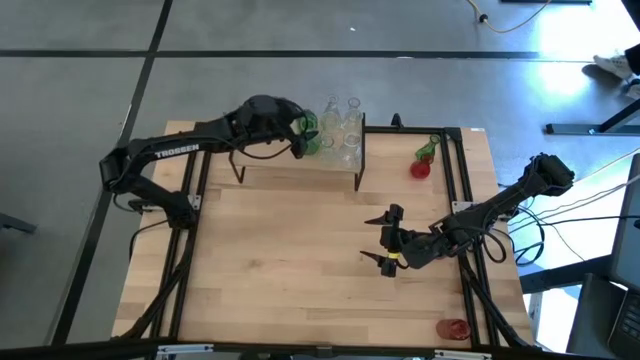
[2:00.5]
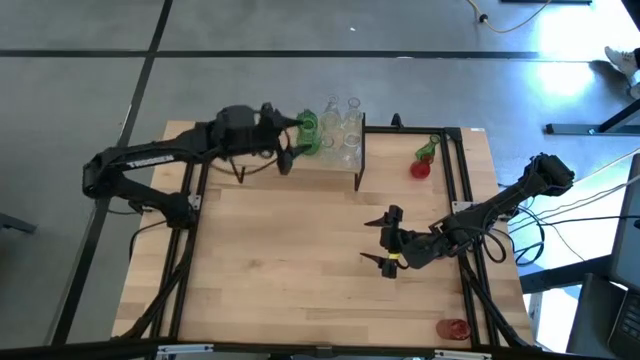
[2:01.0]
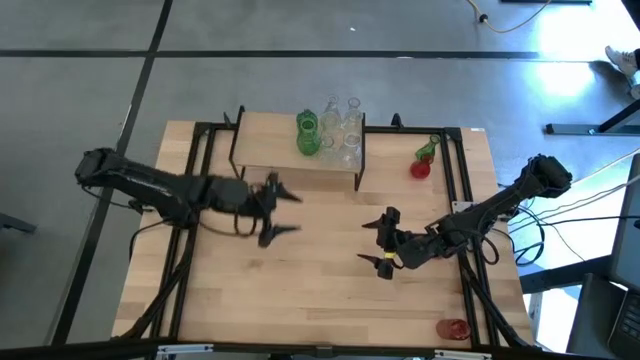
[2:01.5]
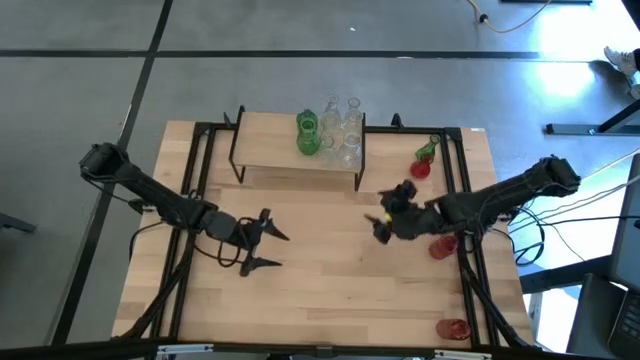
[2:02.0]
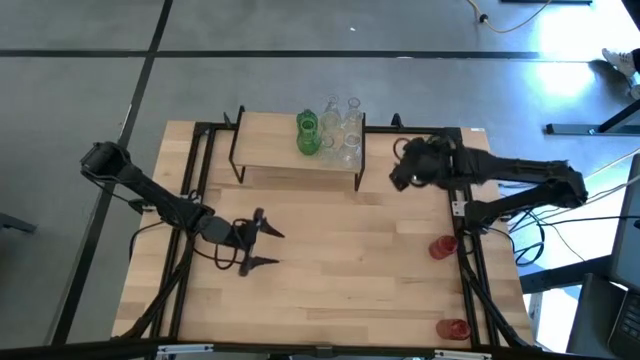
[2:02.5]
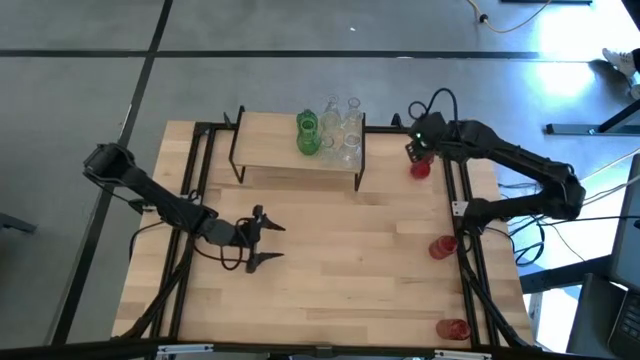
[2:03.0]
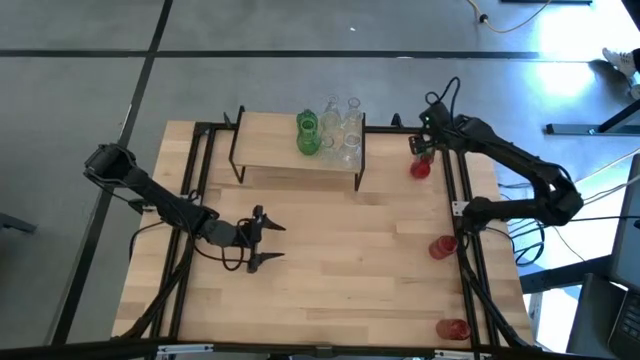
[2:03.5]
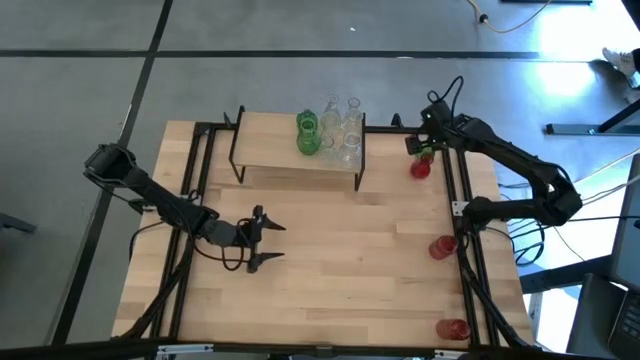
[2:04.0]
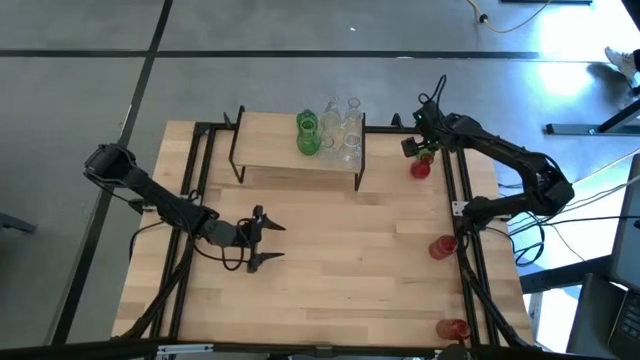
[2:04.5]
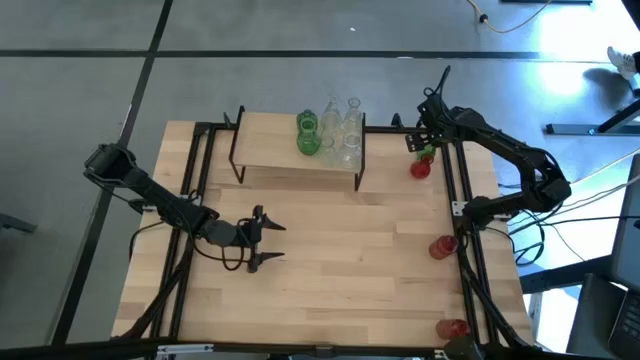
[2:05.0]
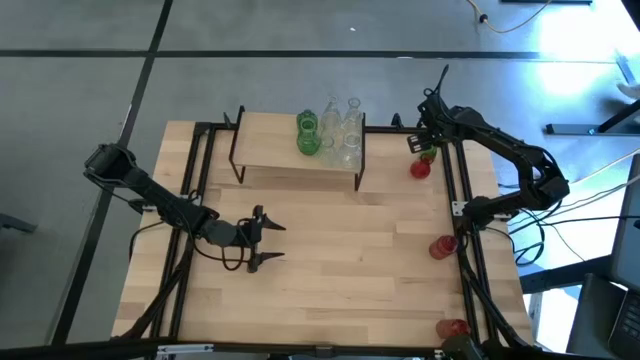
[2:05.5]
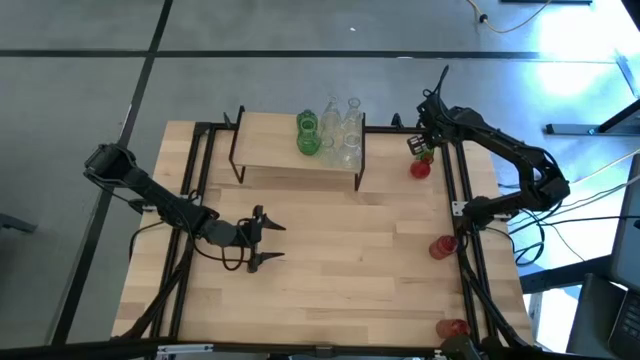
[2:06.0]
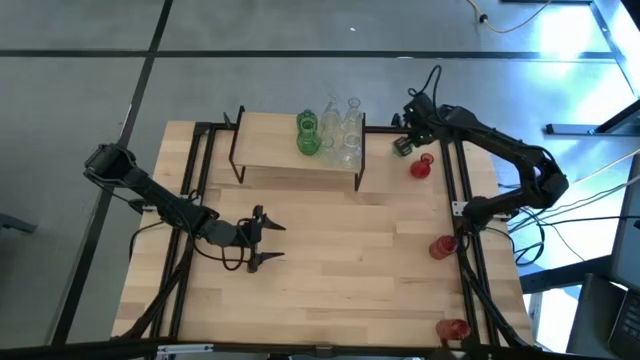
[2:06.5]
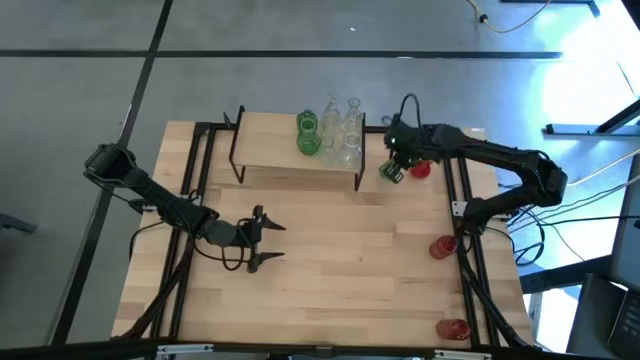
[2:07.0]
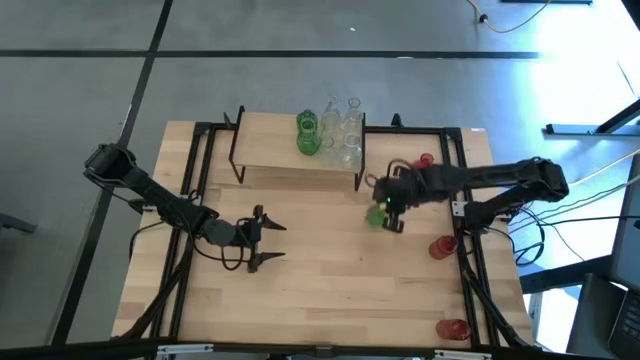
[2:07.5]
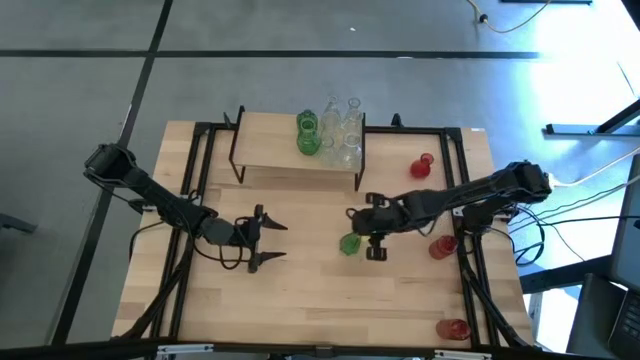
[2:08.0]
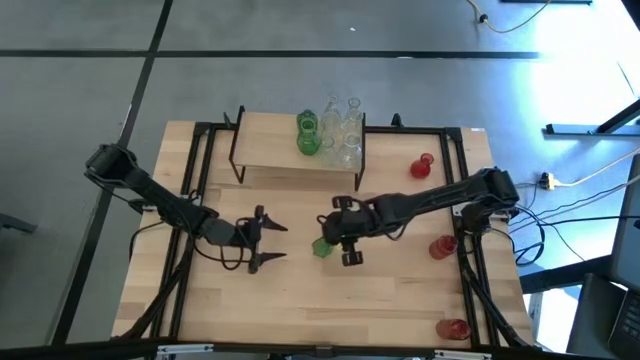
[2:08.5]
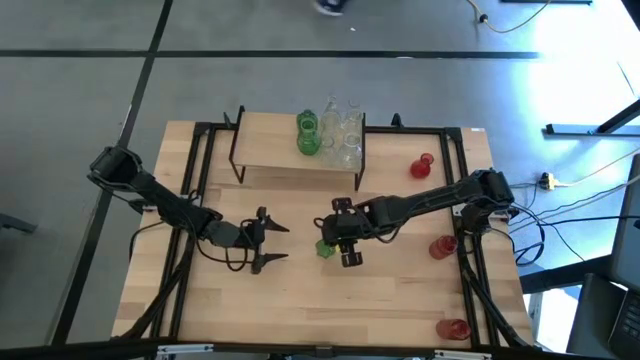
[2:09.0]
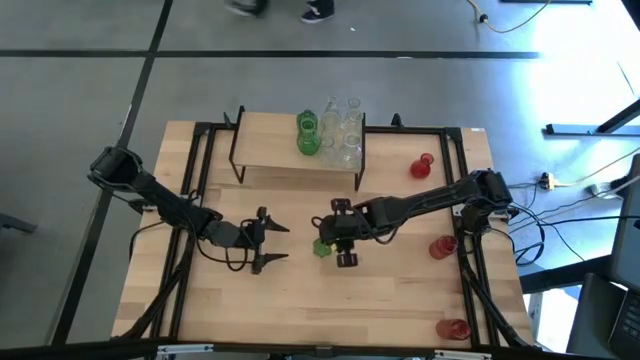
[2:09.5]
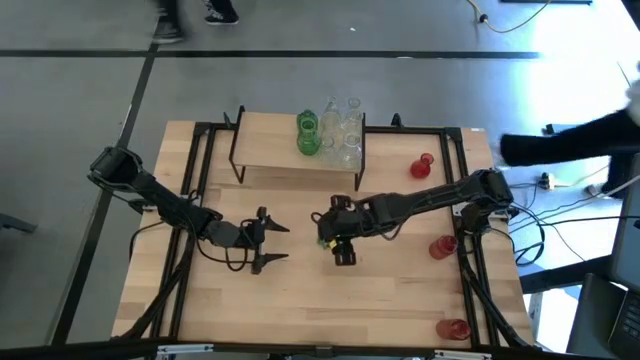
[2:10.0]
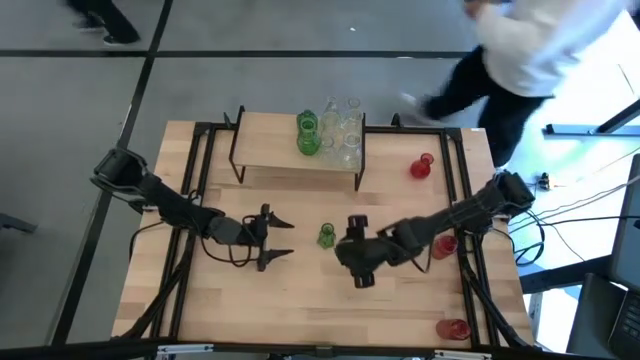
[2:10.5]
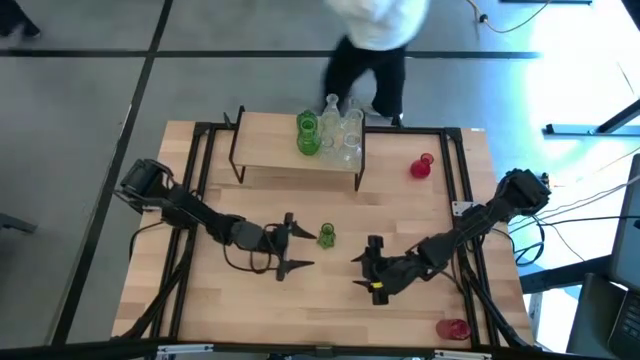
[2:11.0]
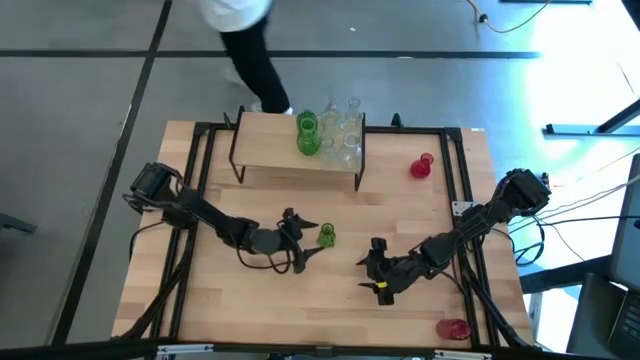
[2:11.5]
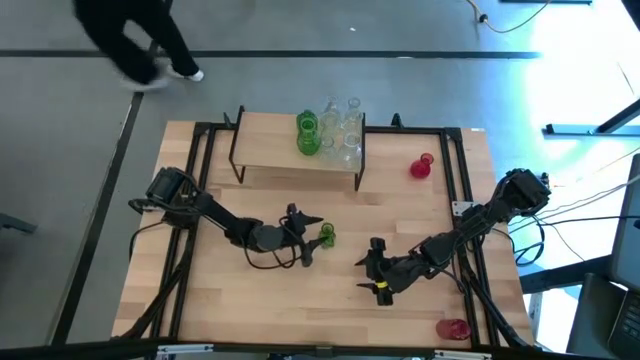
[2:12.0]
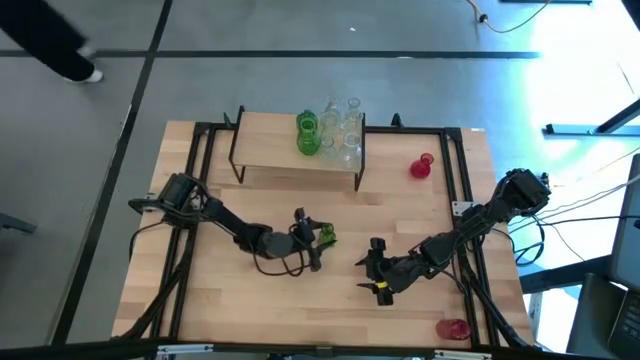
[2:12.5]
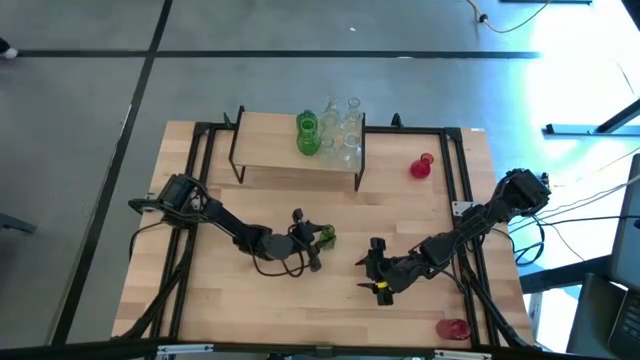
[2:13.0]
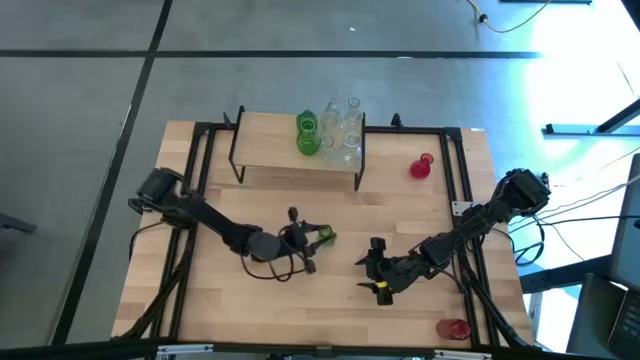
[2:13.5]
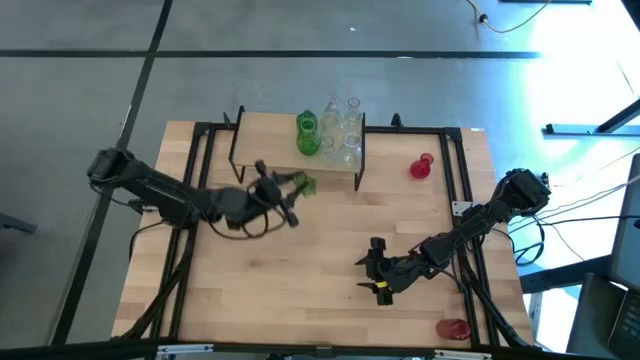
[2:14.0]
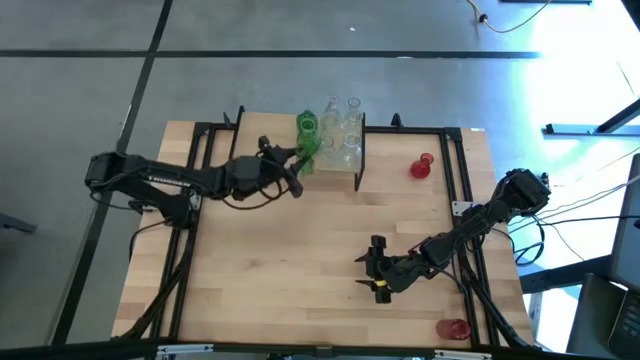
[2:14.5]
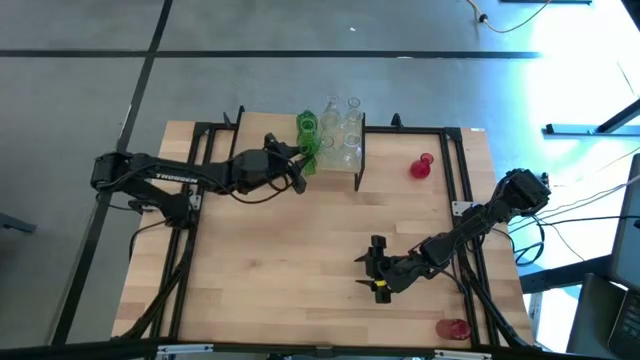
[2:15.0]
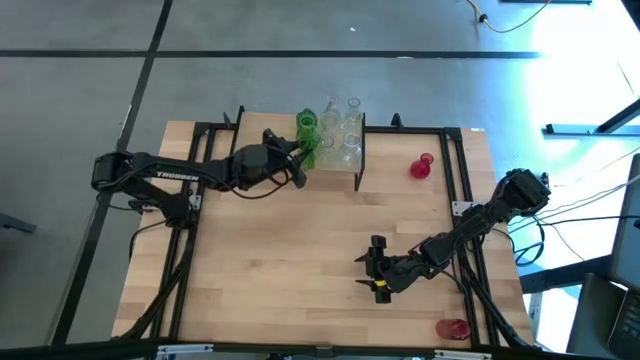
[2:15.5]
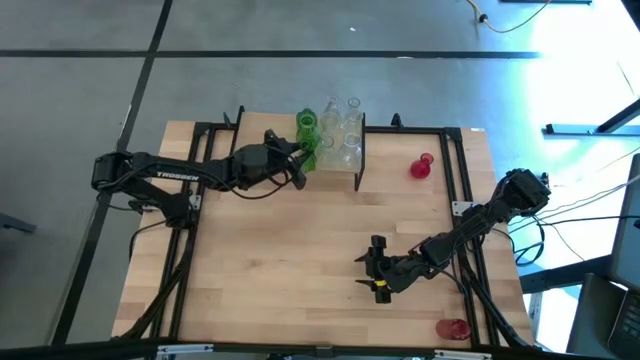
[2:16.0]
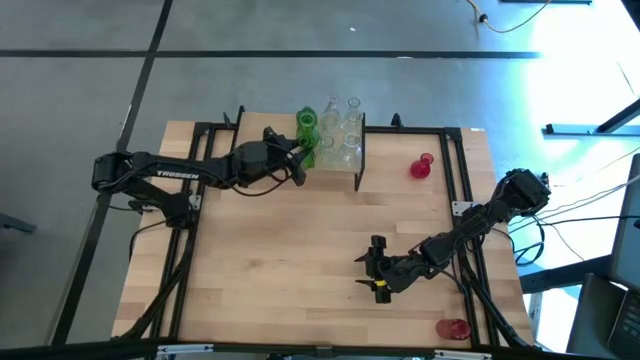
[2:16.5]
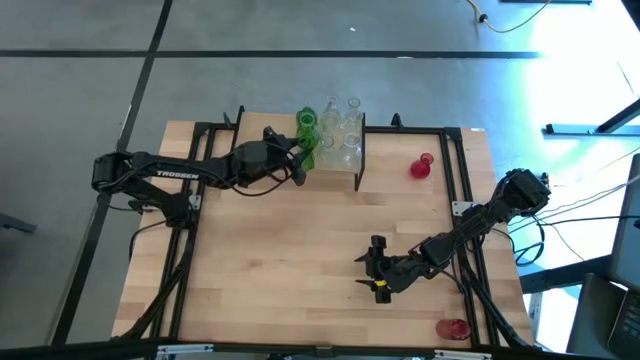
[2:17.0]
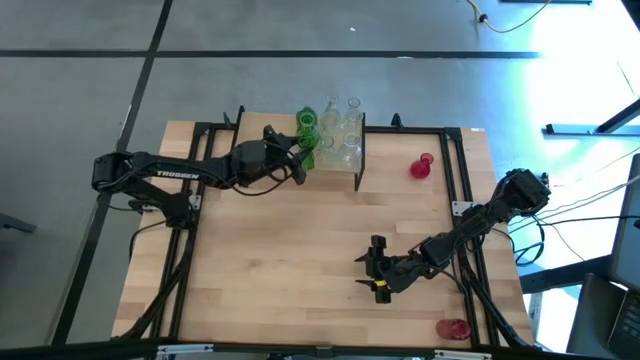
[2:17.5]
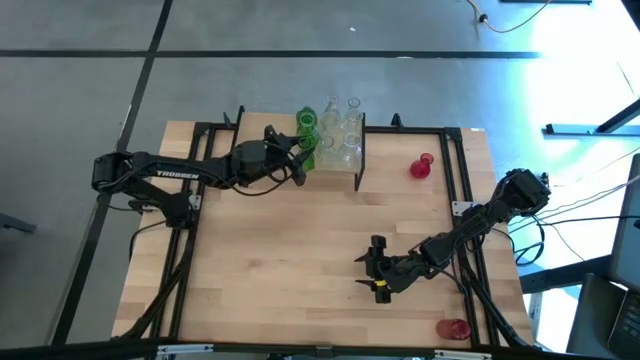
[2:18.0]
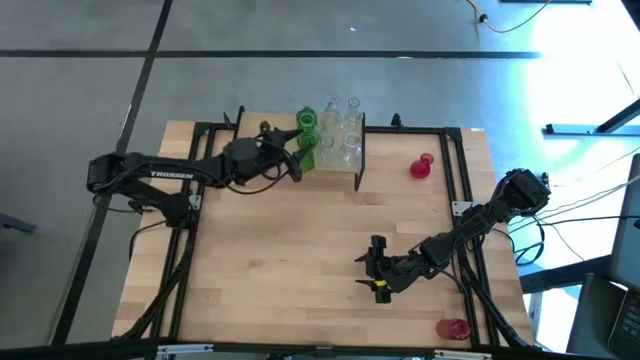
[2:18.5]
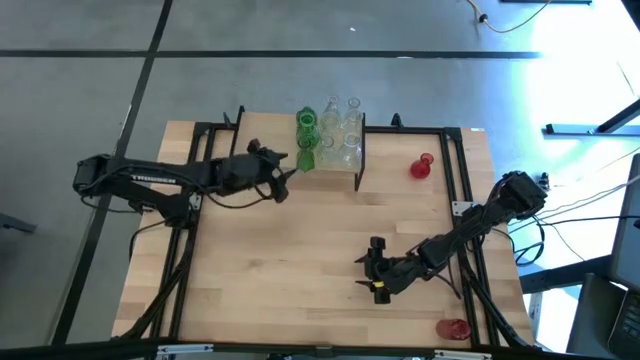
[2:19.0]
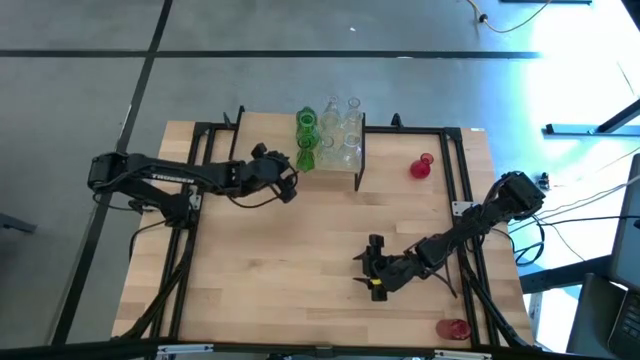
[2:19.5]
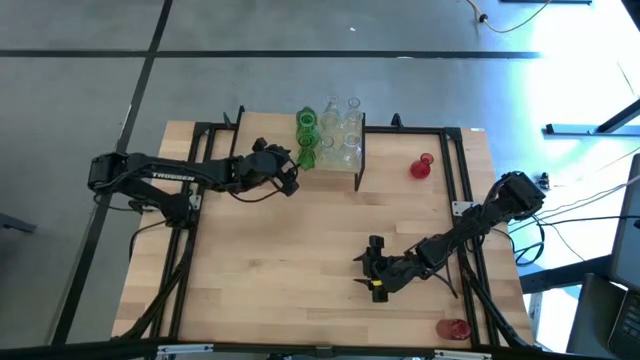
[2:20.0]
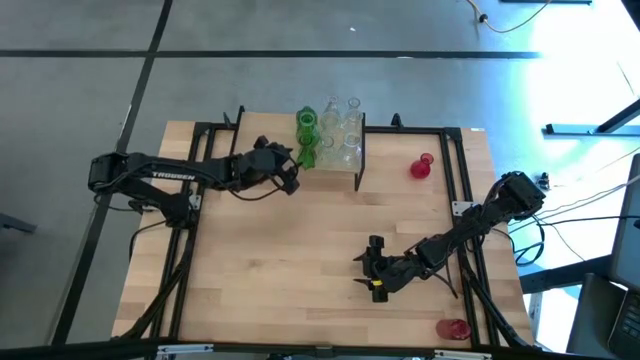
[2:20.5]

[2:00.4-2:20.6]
Task: sort vases onto shelf
Put the green vase aligned with the other green vases on the shelf
